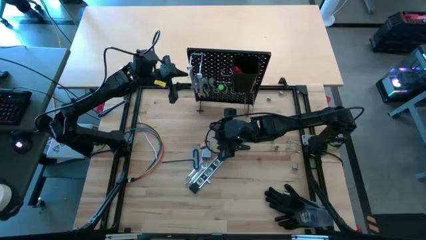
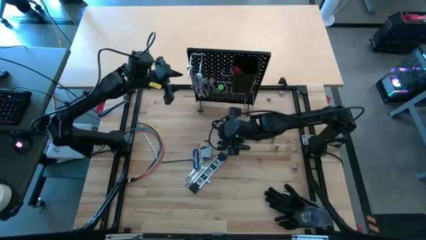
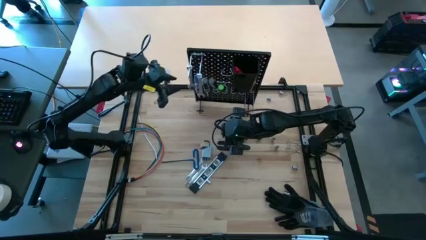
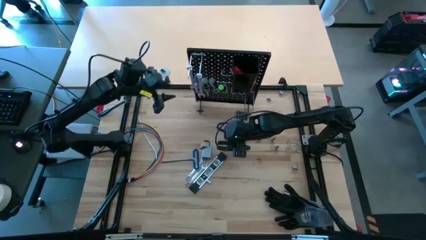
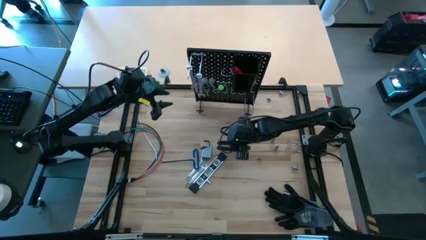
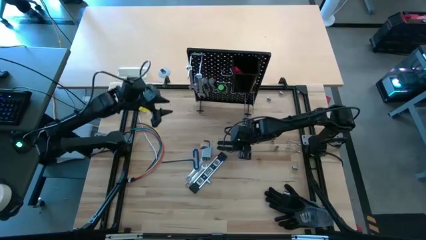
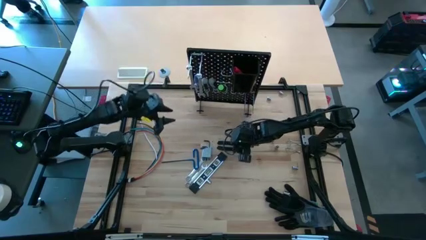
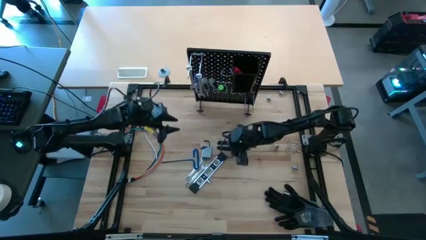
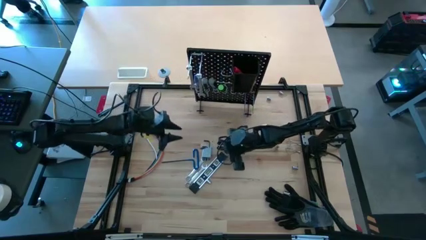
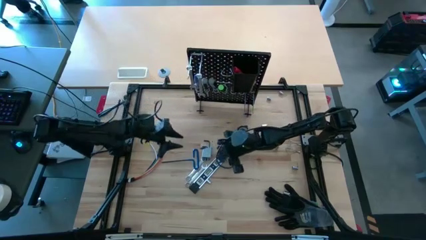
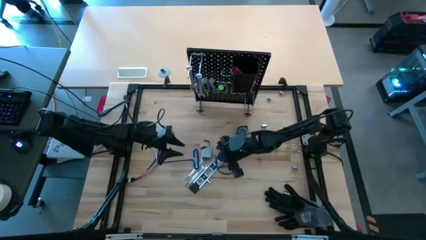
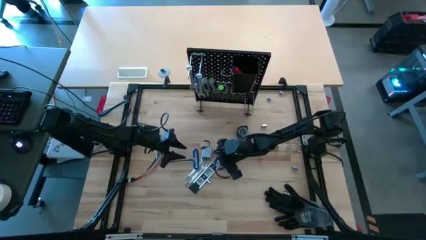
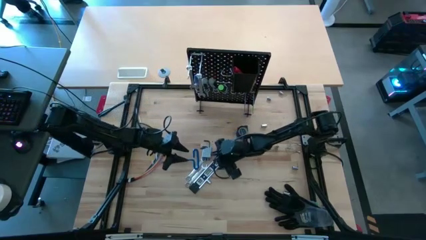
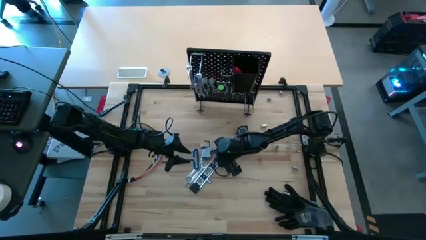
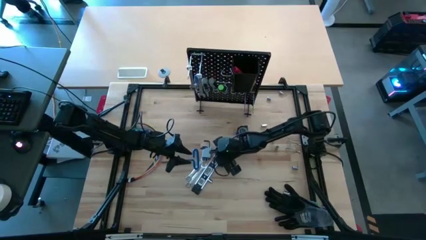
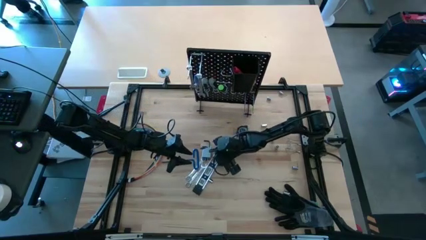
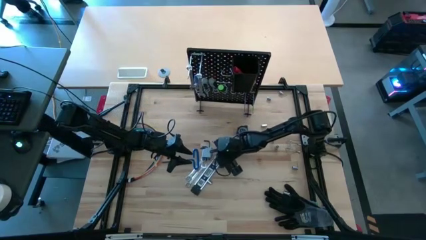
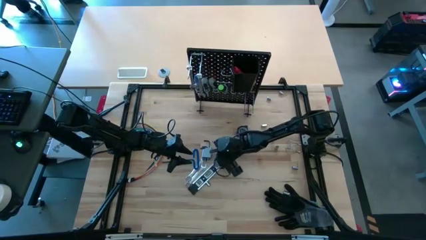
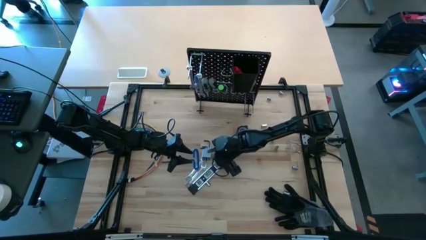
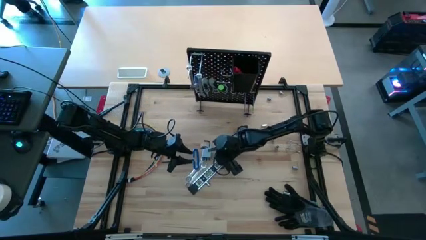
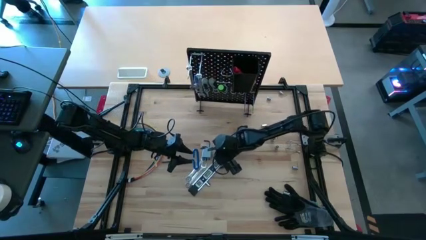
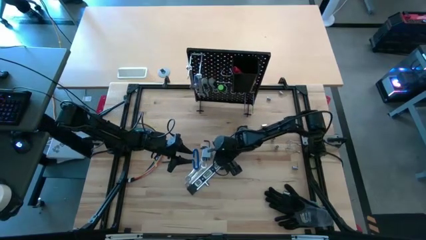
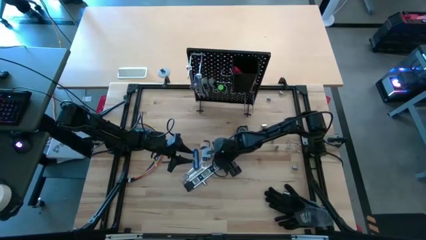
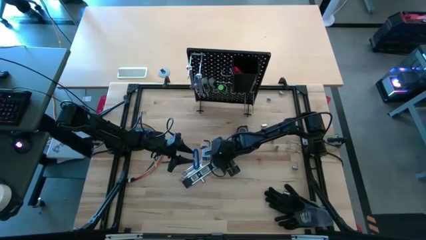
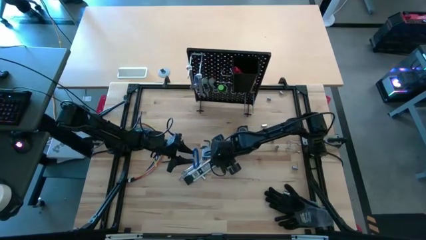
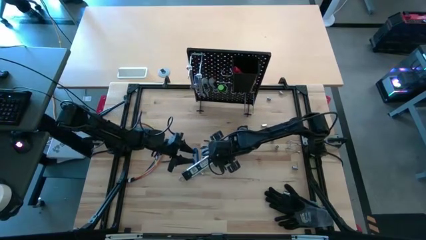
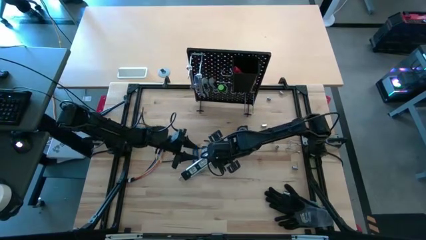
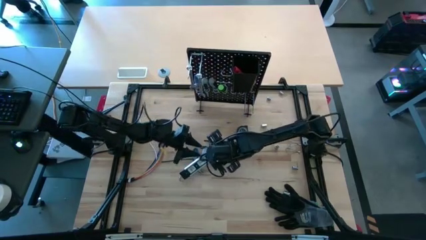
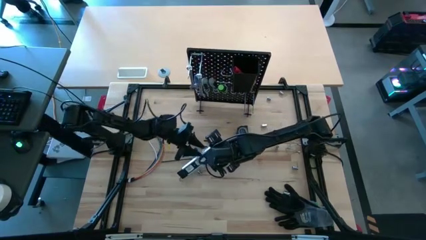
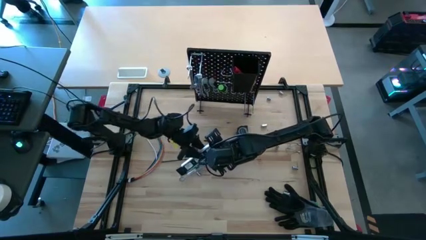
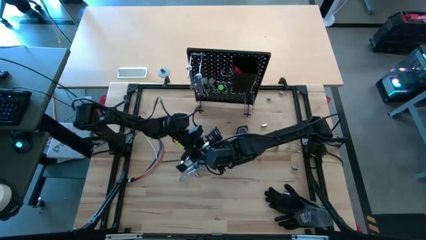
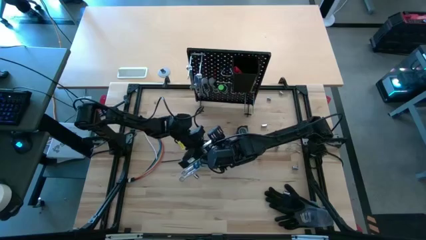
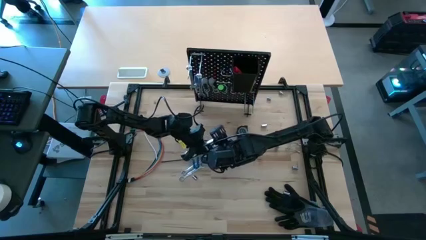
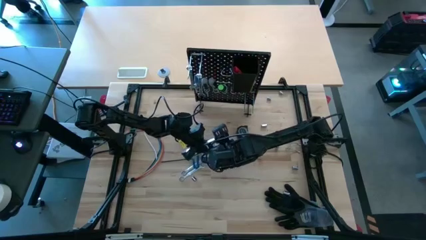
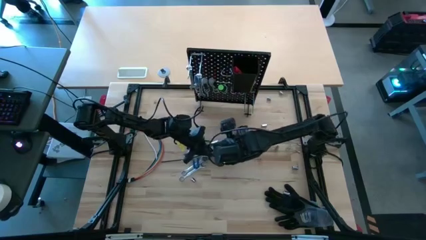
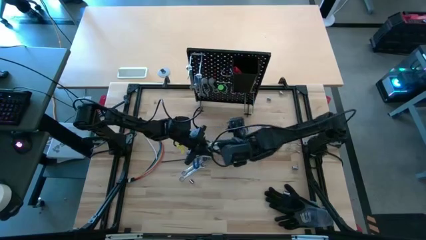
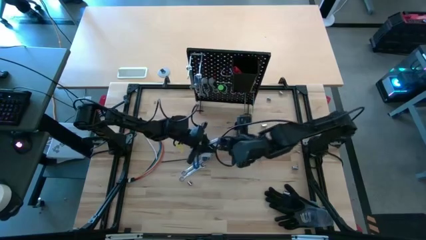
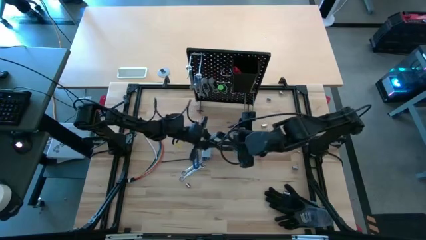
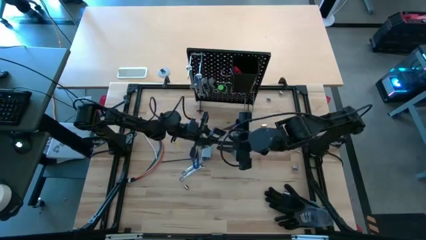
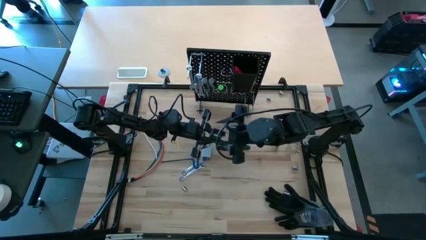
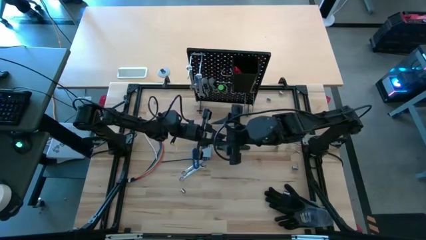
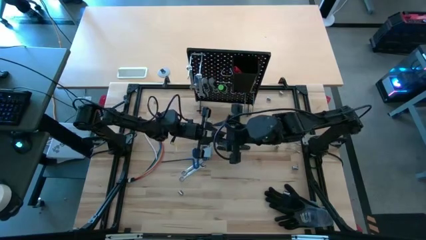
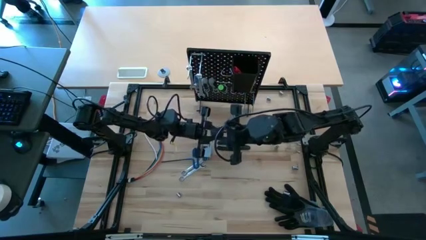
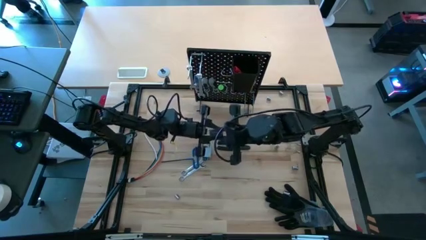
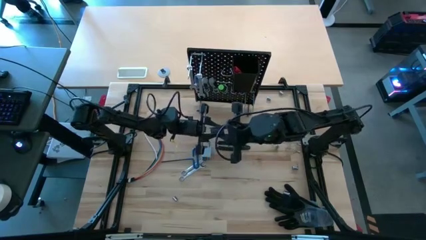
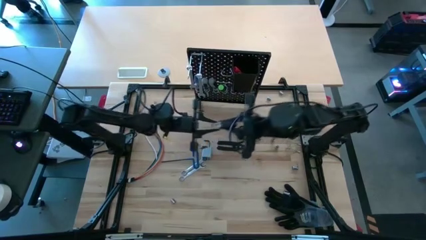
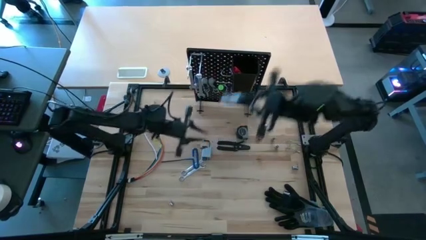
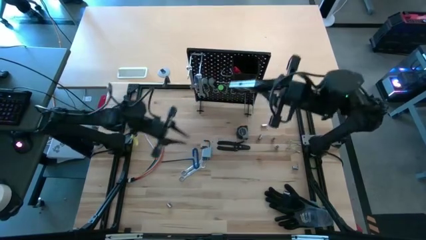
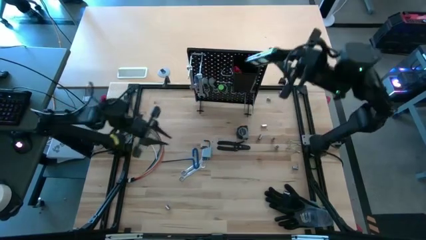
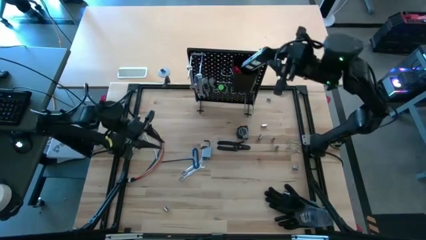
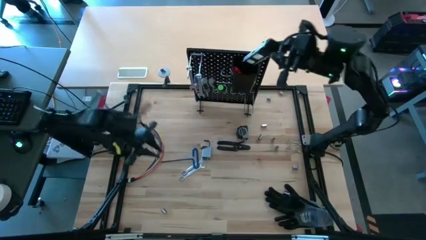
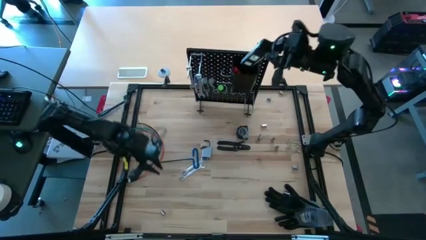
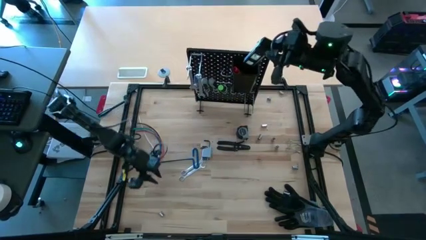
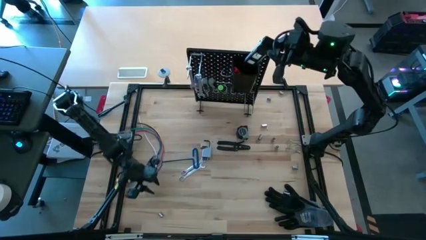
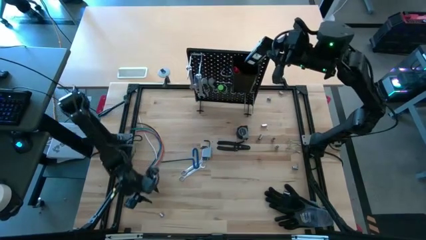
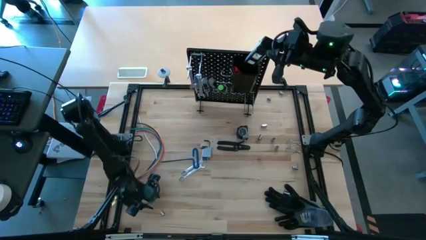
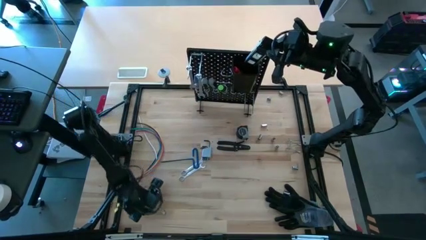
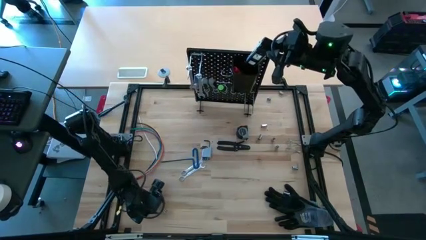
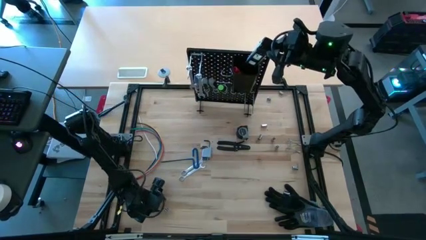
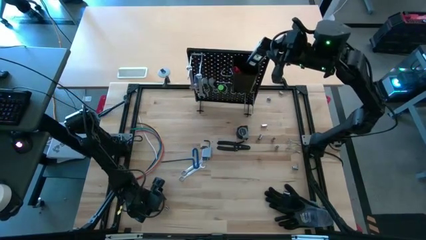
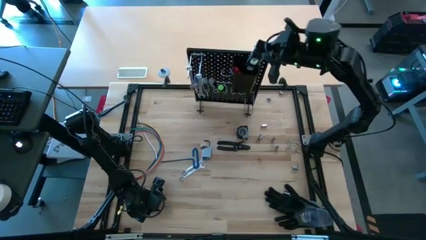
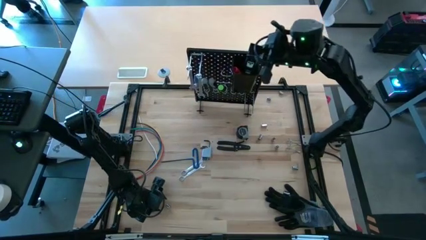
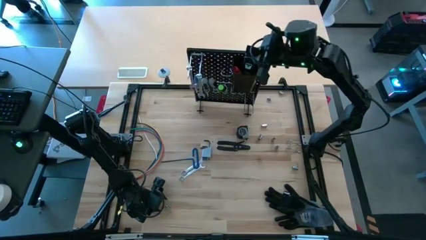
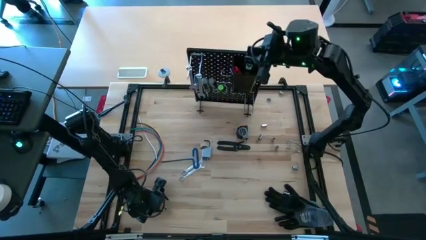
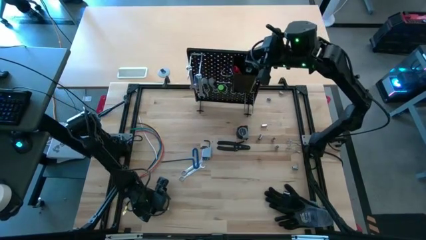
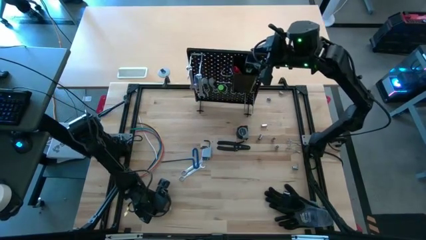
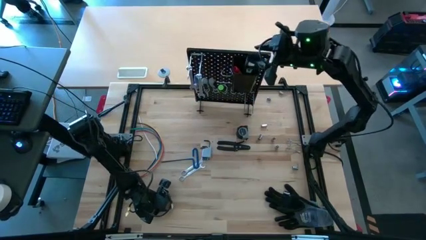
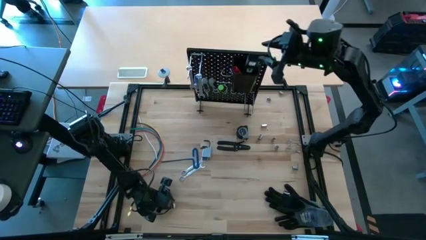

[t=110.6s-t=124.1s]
Task: Hang tools onto peg board
Put the spirit level into the black bin on the peg board

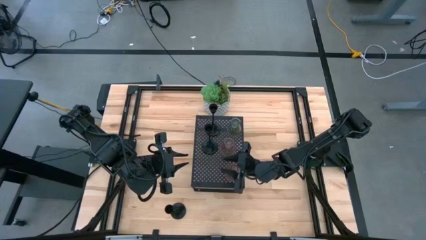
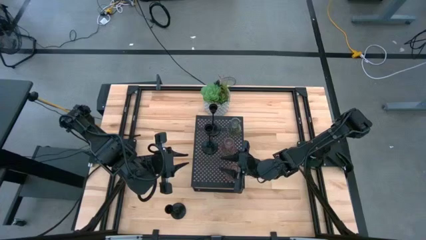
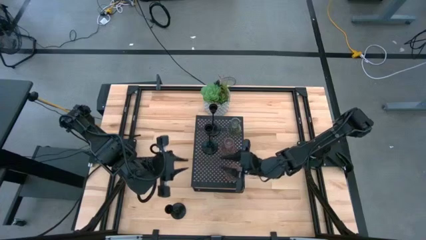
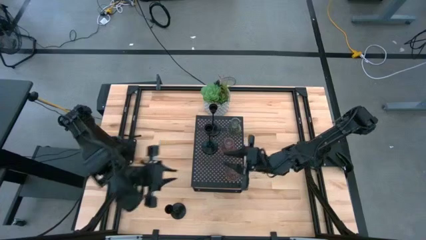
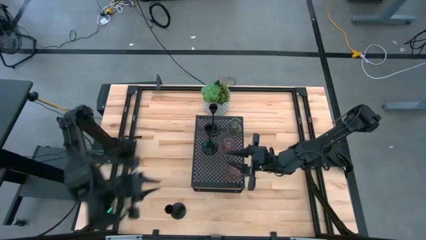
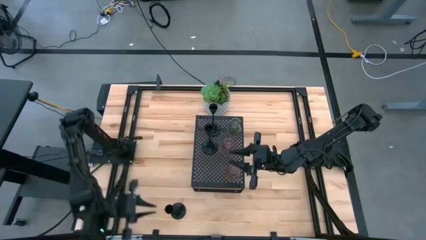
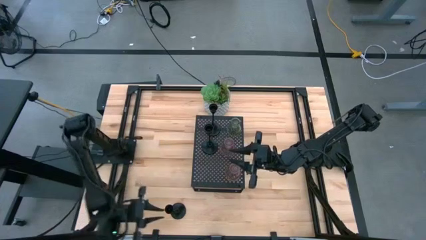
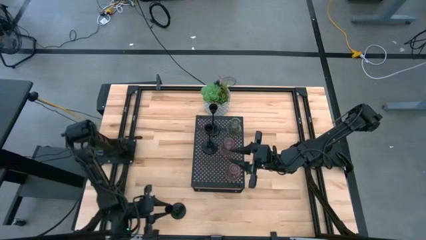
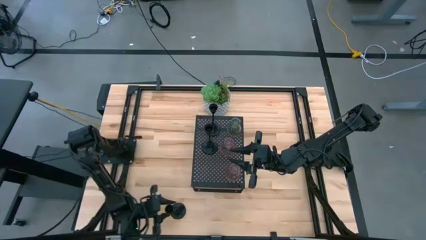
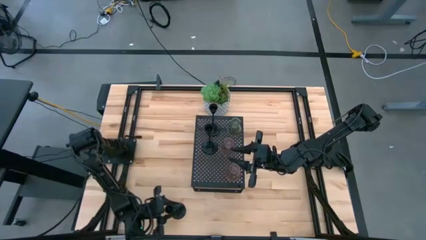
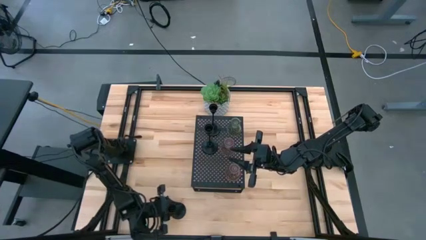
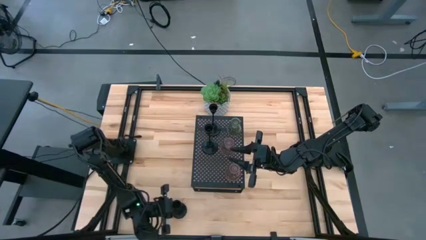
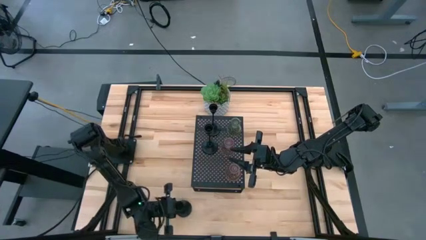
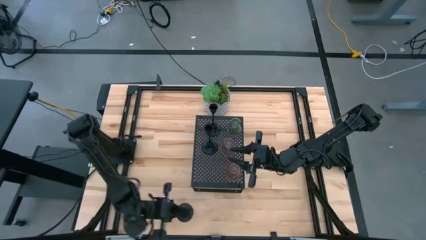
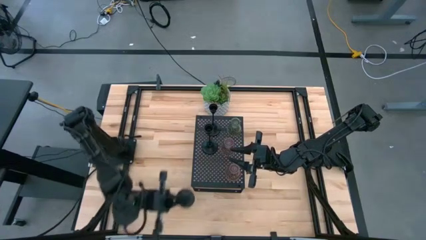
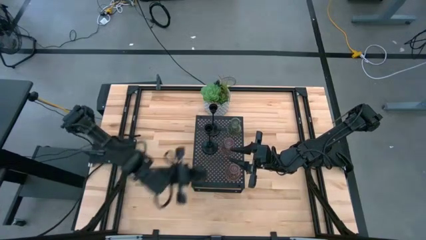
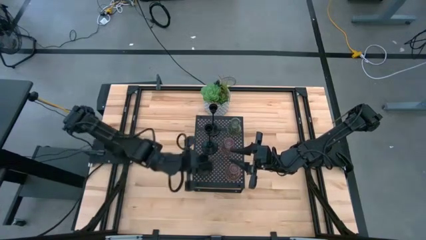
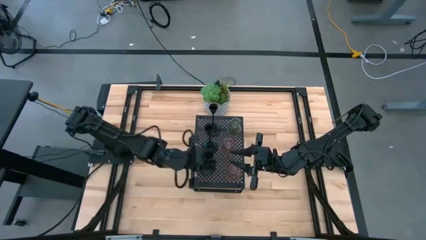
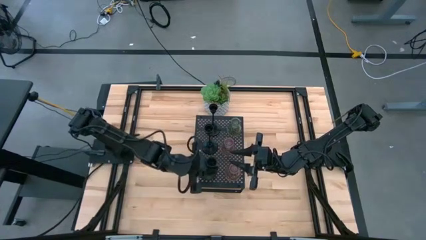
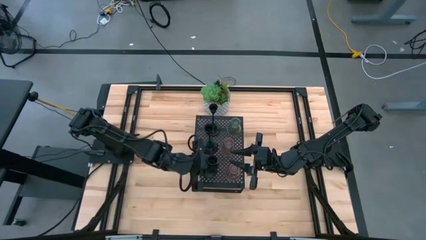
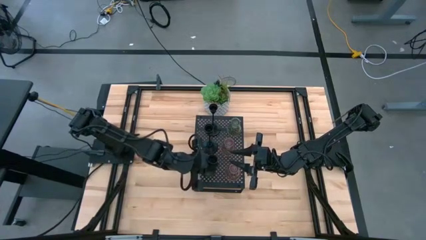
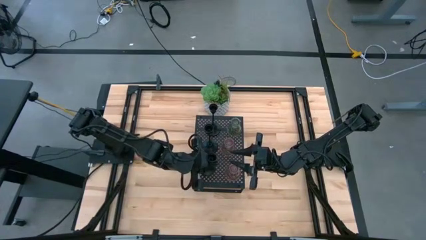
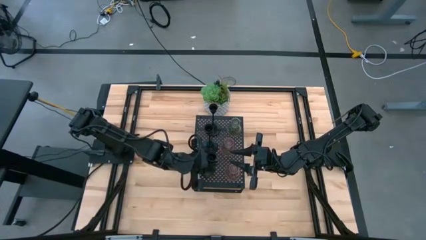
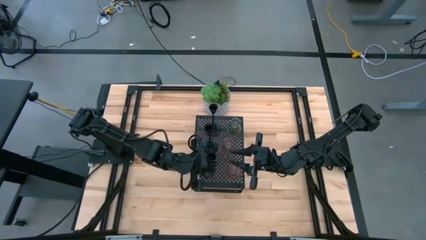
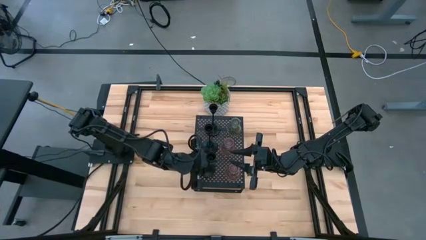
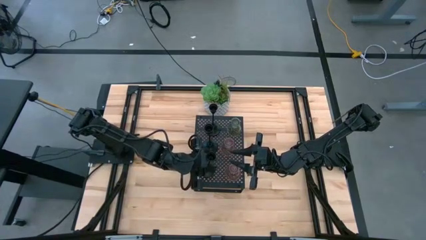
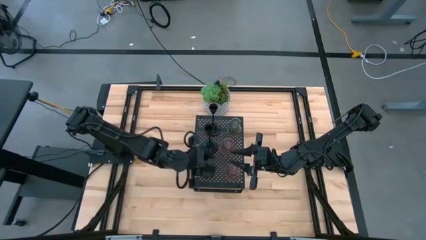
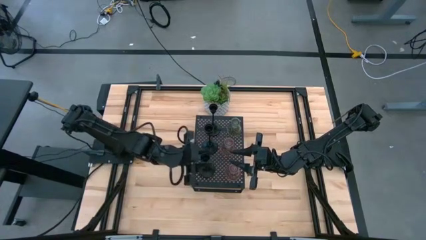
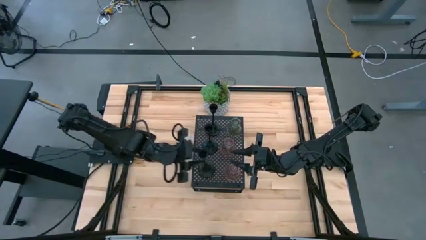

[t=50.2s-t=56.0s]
Task: Pick & Place candle stick holders
Align the black candle holder with the black candle holders on the shelf
